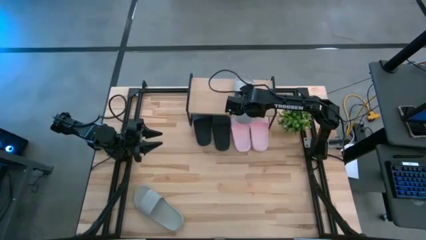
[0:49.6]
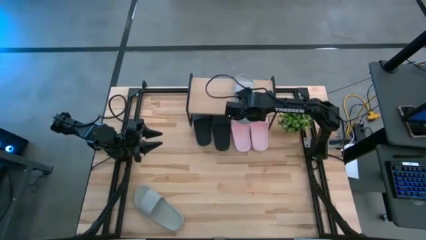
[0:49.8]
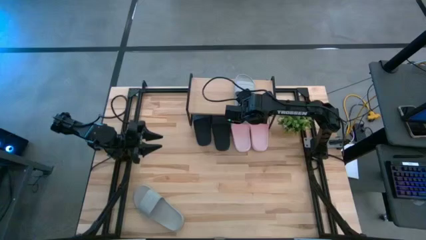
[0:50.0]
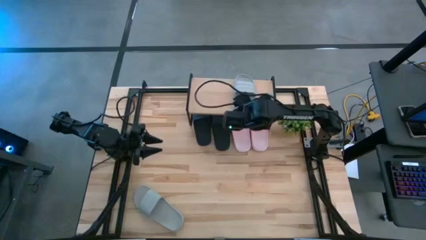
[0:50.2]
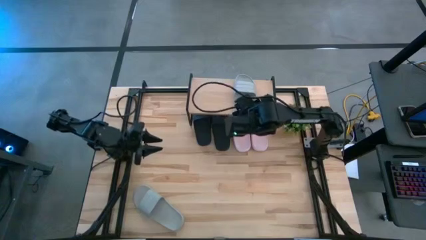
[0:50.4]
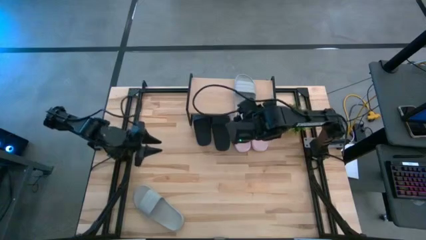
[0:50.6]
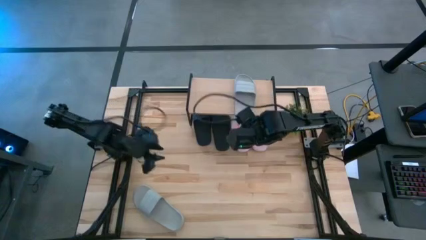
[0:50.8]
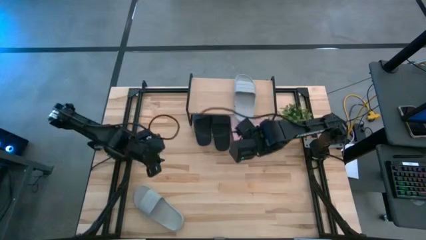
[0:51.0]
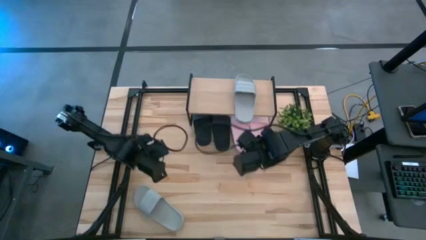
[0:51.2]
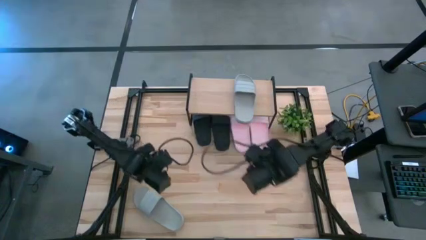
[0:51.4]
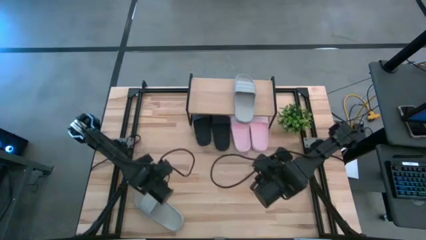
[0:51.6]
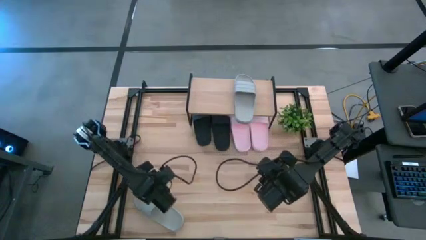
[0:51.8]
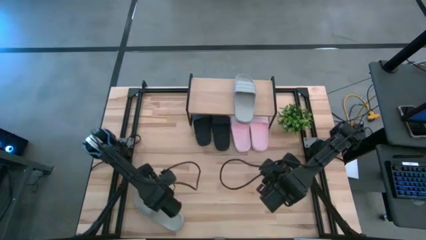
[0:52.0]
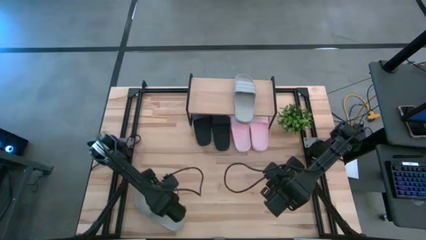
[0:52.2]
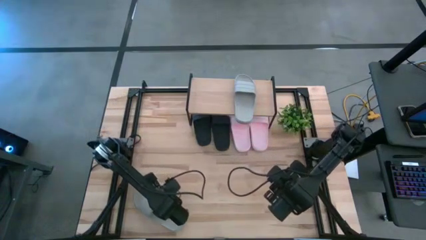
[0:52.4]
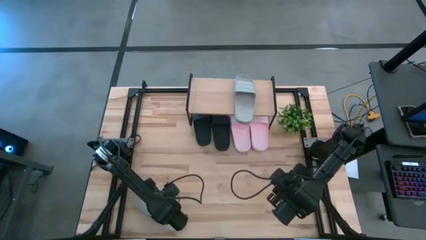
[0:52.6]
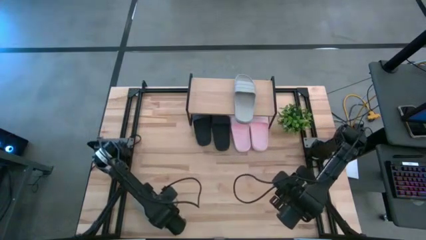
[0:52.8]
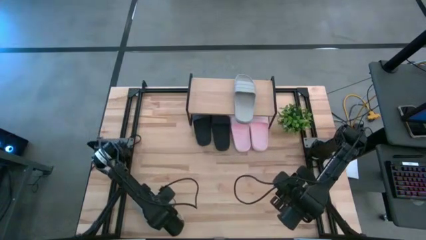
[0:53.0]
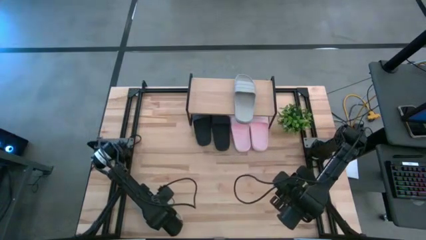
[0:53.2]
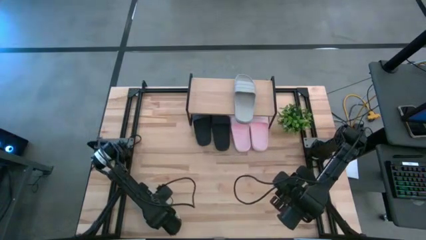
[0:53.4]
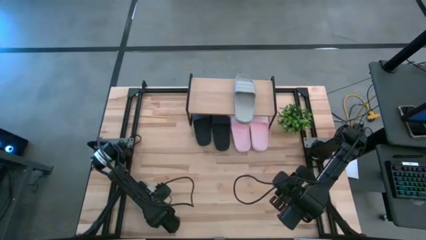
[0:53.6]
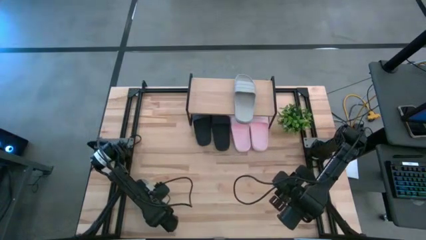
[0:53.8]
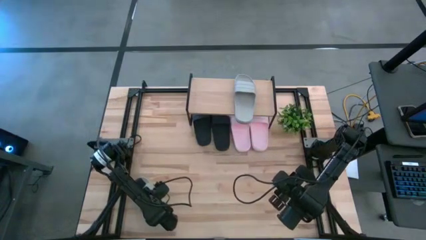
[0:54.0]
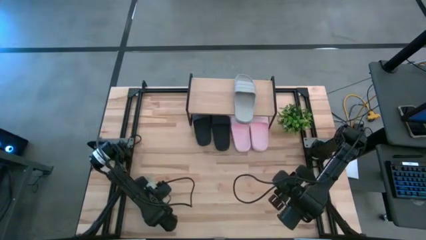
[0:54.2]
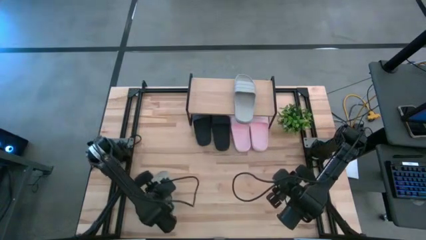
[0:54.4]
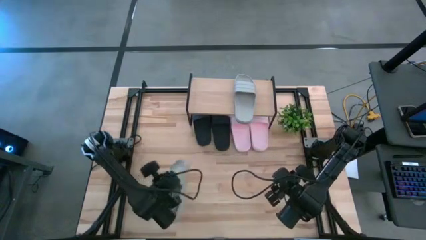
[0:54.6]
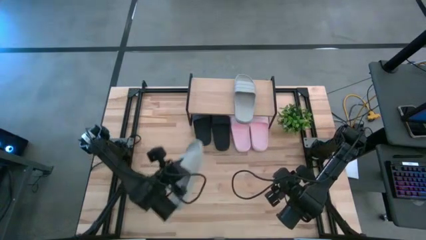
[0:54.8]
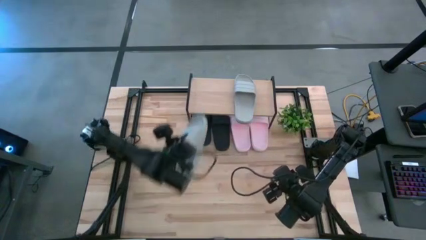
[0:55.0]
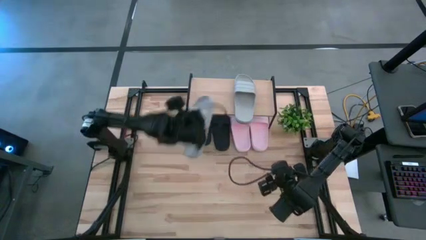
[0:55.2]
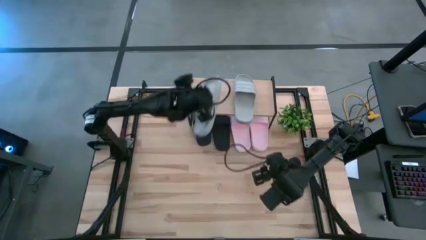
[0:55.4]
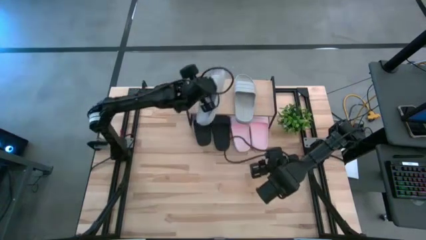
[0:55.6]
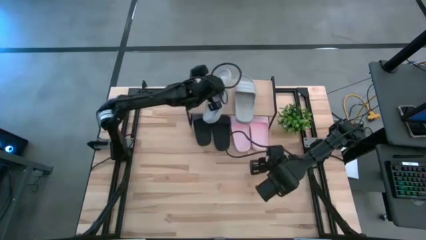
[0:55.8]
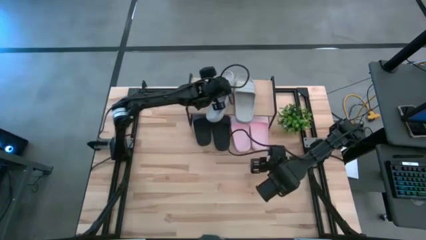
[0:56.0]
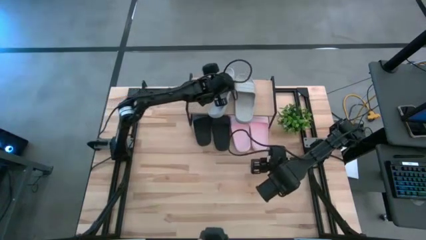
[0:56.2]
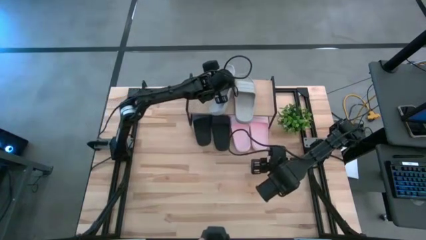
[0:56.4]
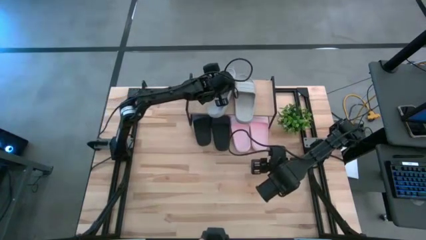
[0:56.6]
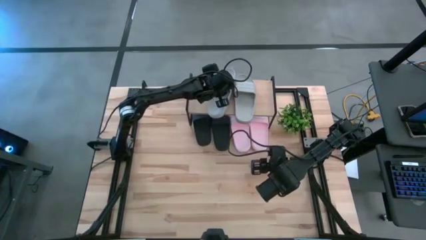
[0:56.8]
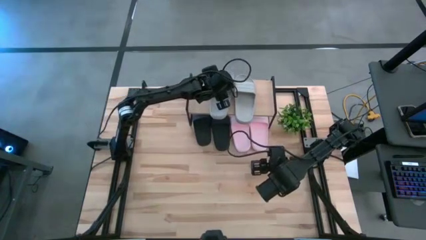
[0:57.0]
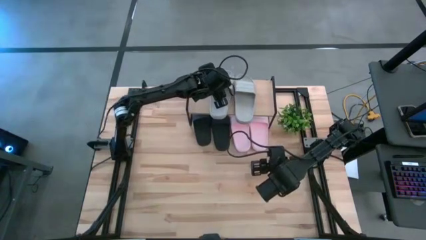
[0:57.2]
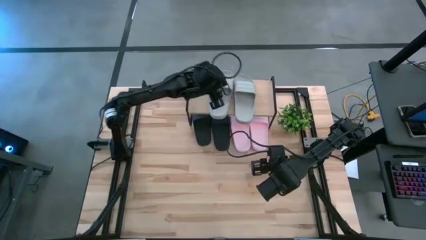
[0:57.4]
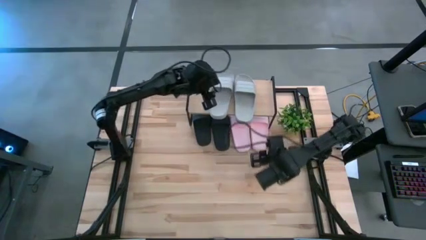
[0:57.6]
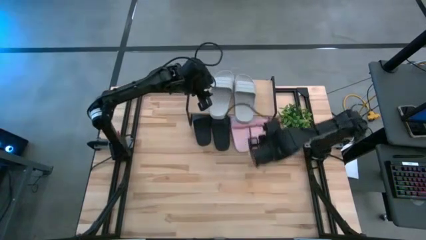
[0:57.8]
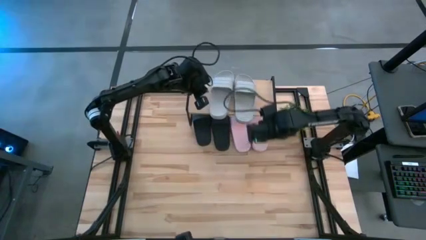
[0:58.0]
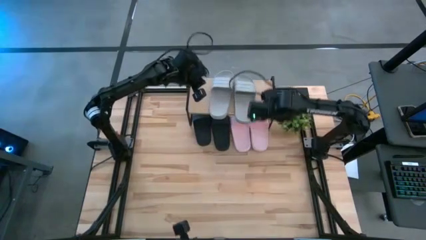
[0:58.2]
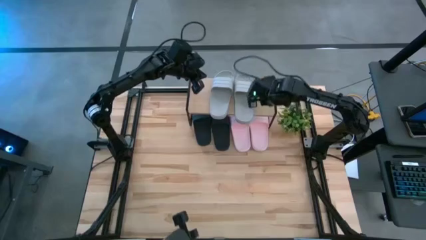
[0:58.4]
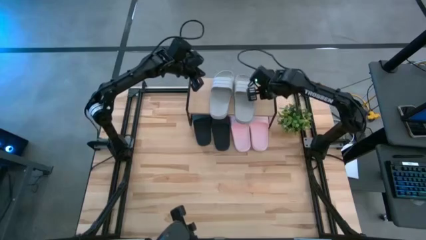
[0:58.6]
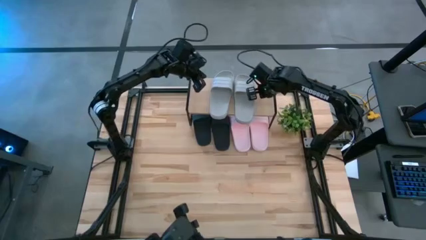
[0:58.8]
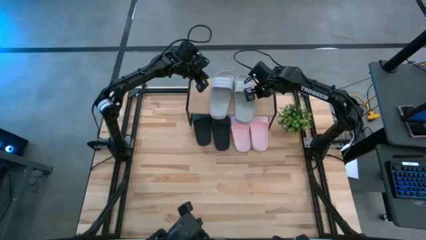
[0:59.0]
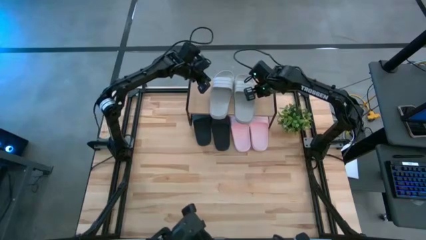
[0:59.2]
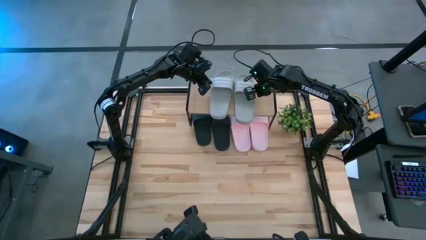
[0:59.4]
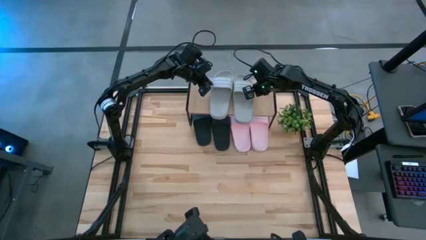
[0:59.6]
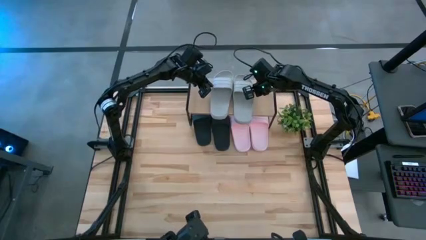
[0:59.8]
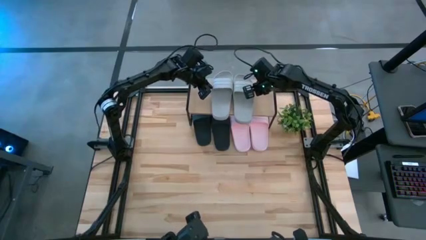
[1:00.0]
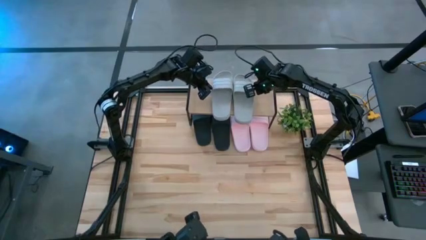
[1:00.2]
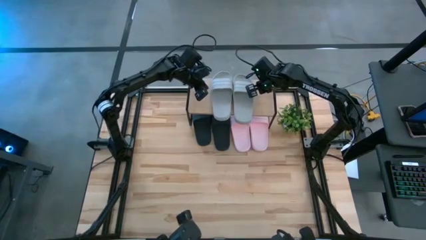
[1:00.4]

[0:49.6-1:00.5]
Task: Pick and place slides into the shelf
Put the gray slipper on the shelf

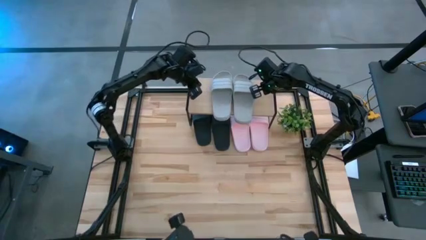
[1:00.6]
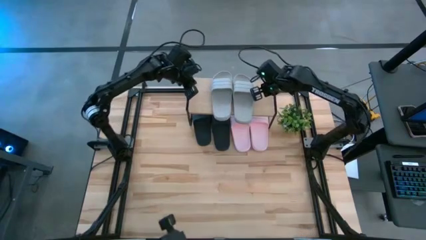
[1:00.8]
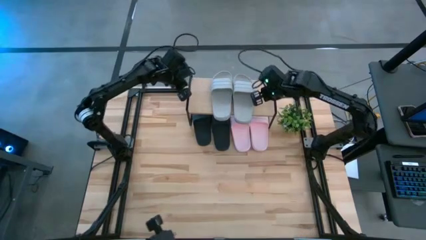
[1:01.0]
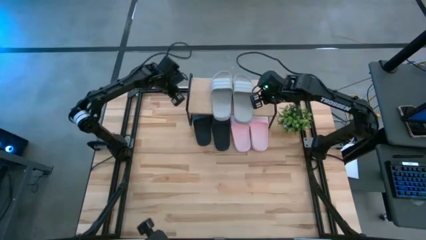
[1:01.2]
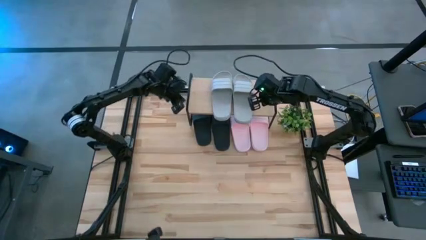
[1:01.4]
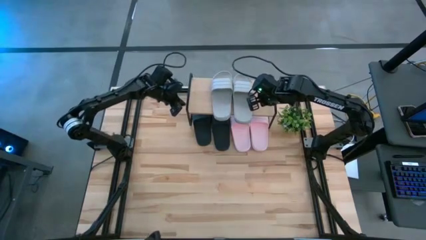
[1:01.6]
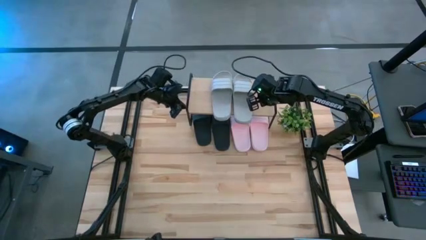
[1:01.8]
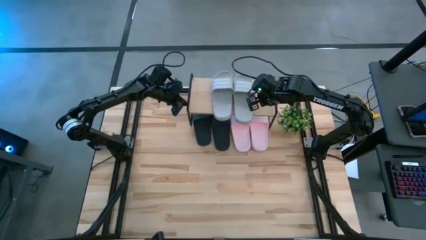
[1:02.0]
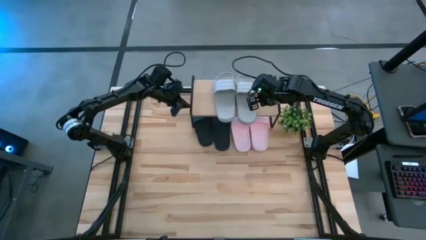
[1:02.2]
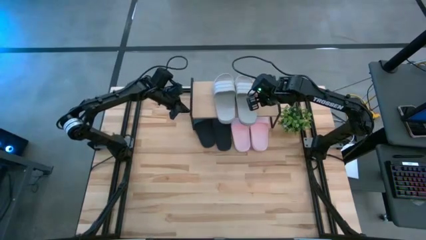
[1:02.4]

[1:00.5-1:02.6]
Adjust the shelf

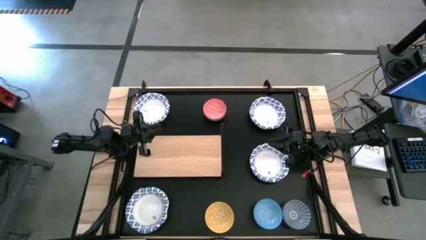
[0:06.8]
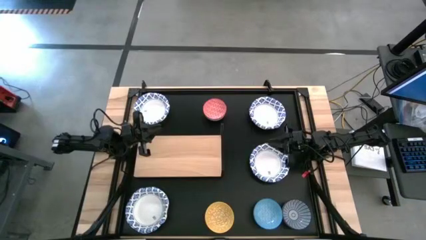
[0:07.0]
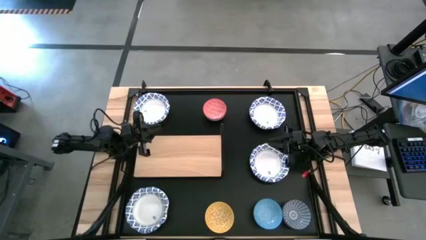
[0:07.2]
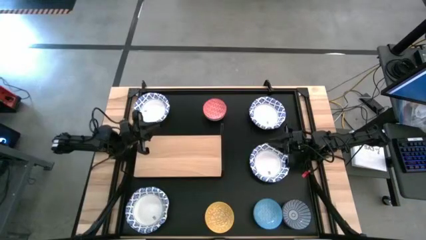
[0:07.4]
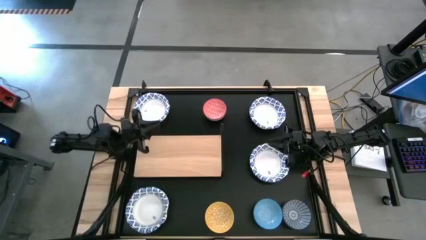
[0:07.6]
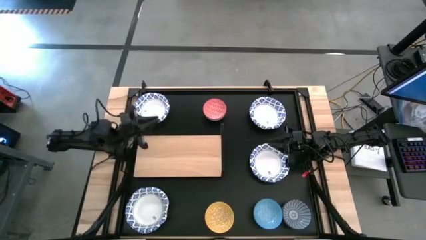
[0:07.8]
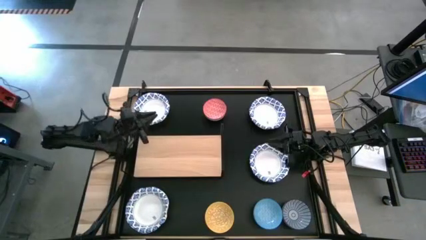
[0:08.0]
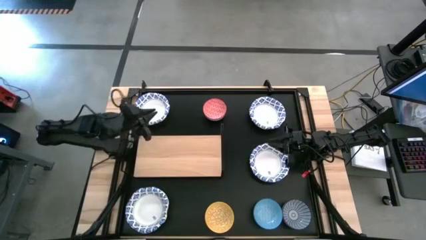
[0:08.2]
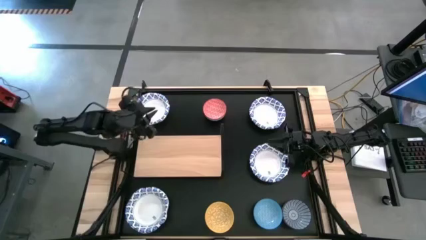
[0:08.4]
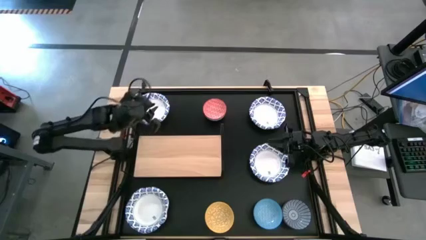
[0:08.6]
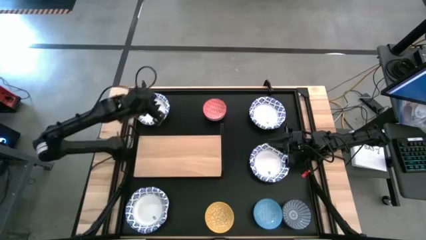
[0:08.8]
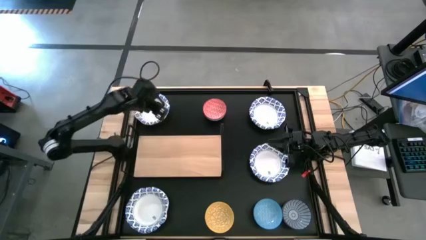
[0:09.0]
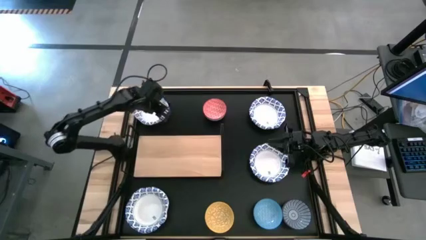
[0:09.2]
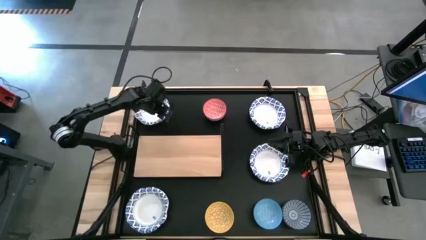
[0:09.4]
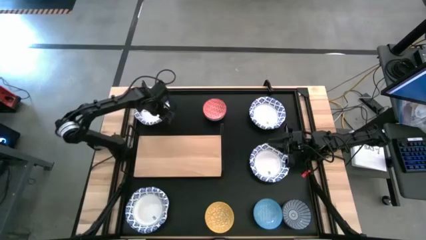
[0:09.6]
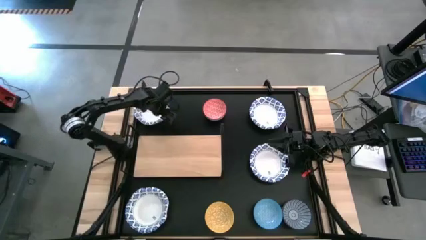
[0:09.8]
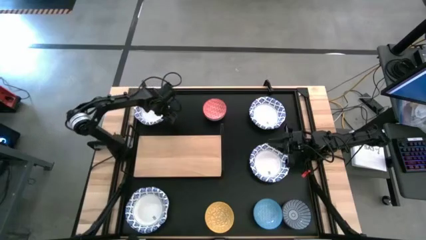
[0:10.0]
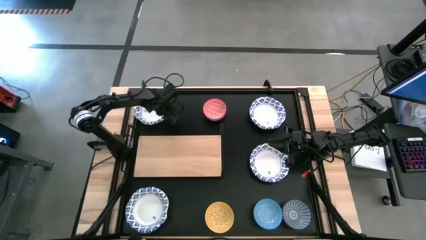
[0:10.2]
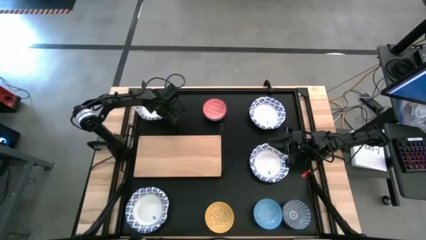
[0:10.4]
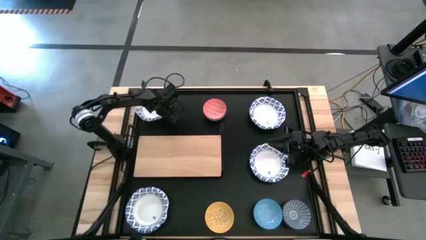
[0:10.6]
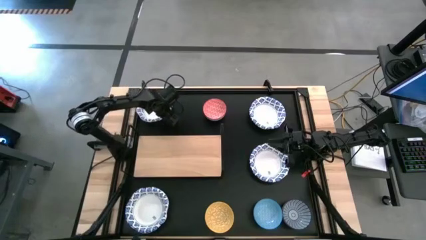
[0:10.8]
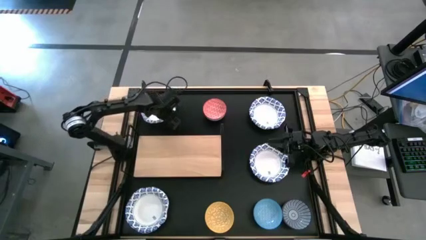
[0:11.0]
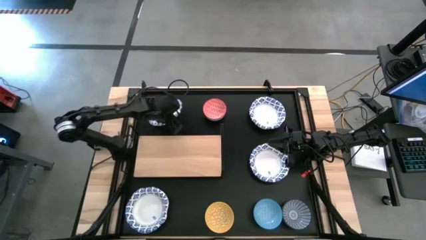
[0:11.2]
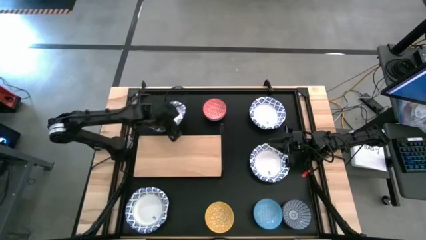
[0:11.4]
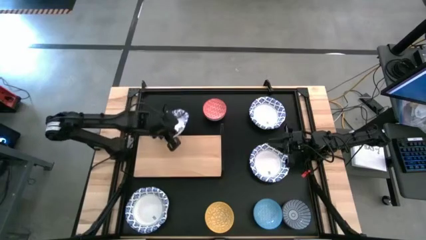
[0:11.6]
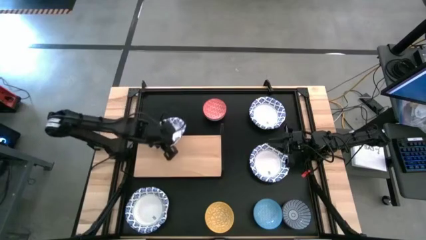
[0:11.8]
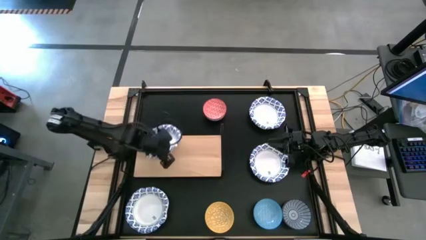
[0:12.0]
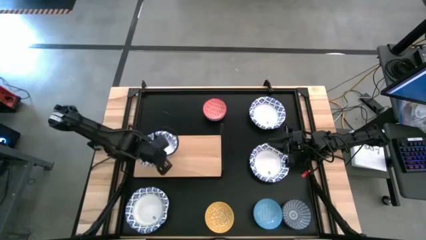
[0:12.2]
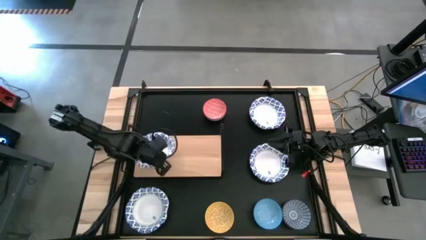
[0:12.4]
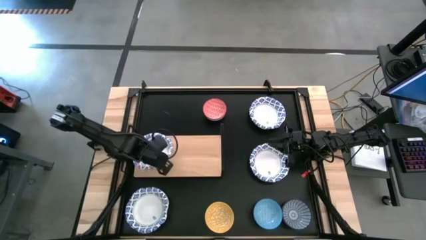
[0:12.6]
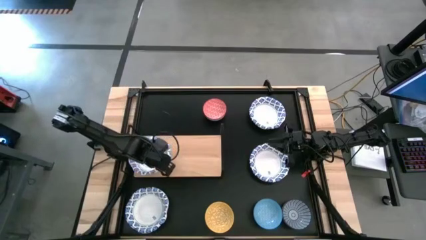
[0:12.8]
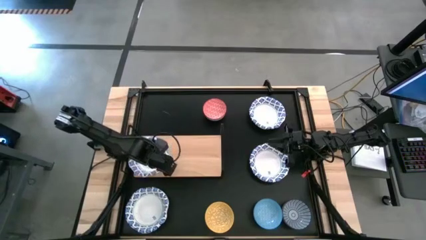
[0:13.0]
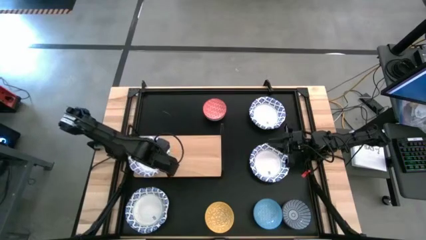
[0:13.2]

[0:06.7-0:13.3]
Task: Place and stack bowls onto a shelf
Put the blue patterned bowl on the shelf
